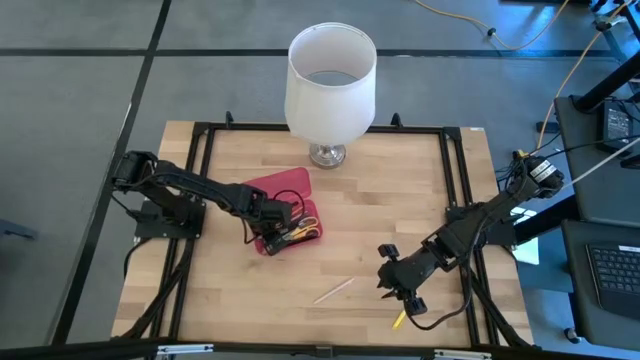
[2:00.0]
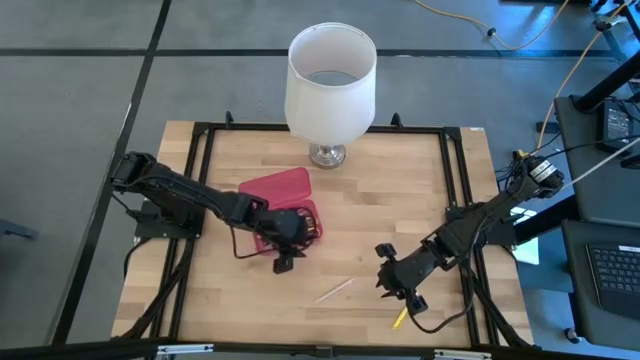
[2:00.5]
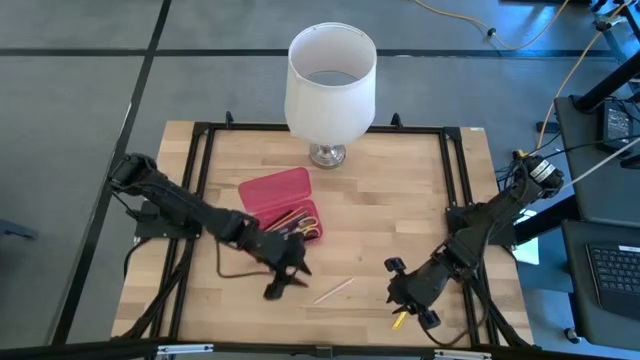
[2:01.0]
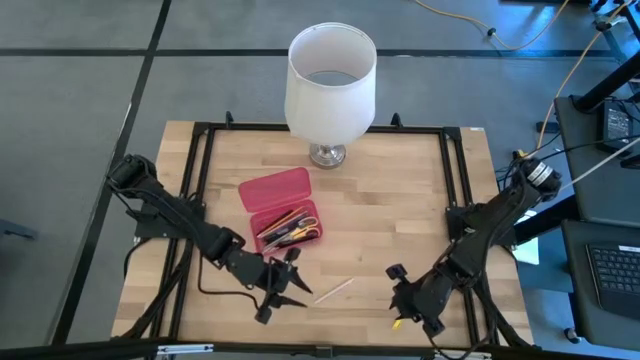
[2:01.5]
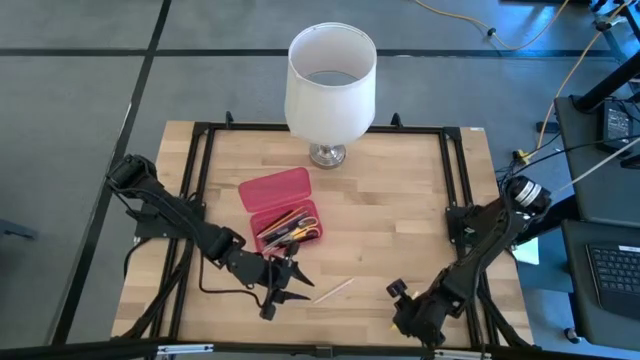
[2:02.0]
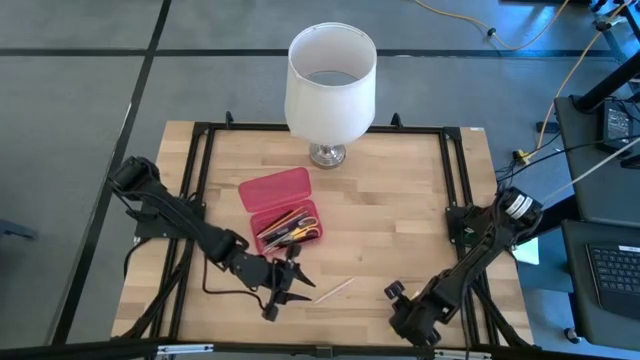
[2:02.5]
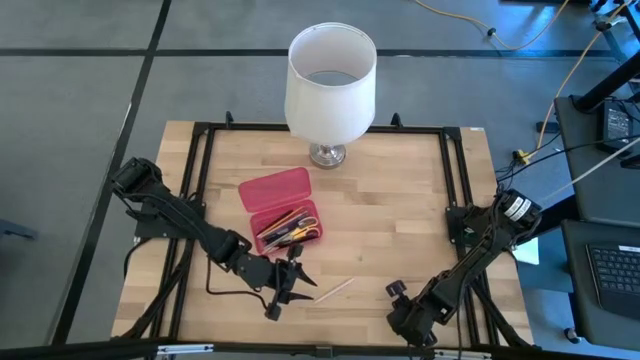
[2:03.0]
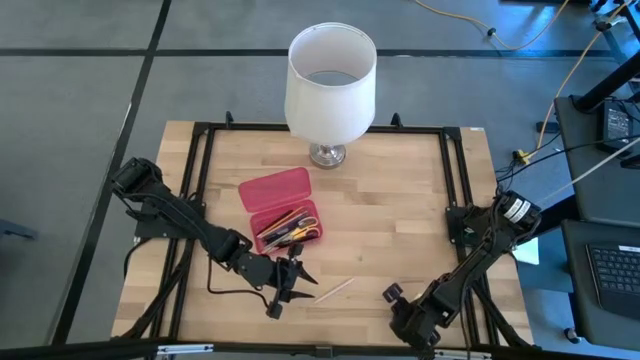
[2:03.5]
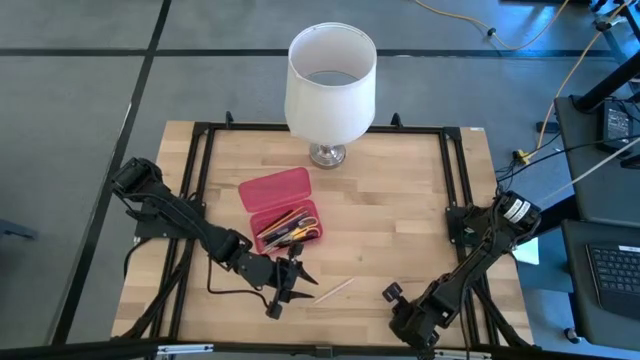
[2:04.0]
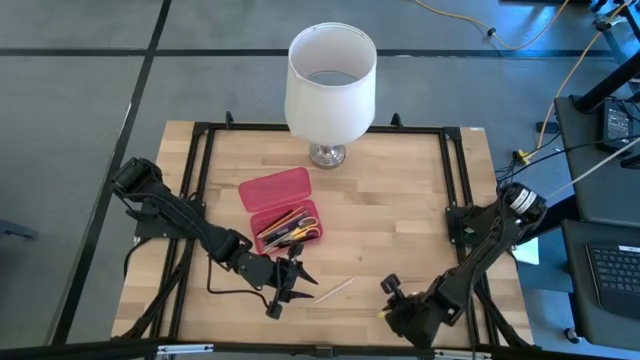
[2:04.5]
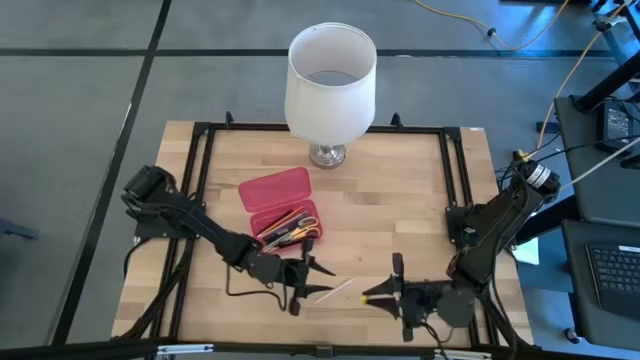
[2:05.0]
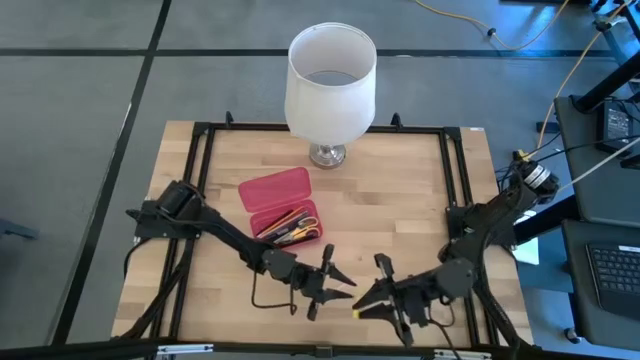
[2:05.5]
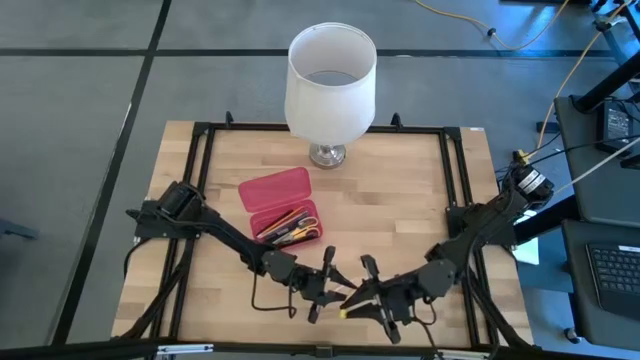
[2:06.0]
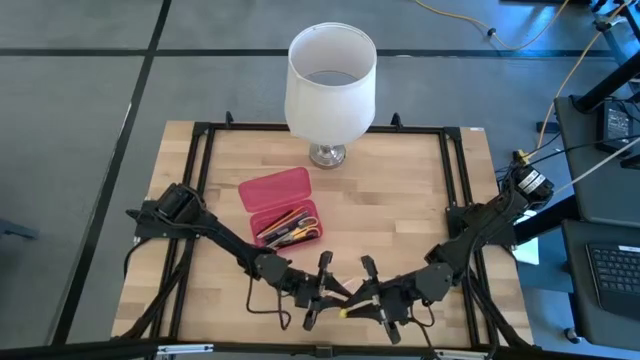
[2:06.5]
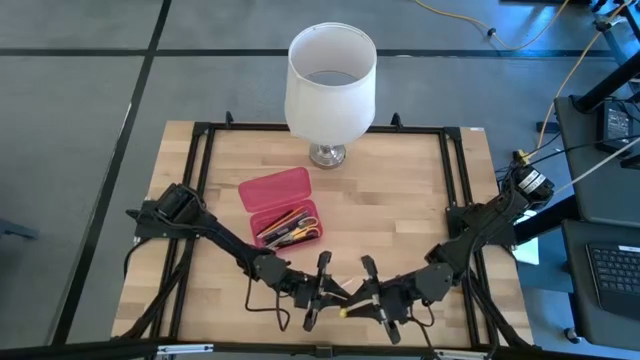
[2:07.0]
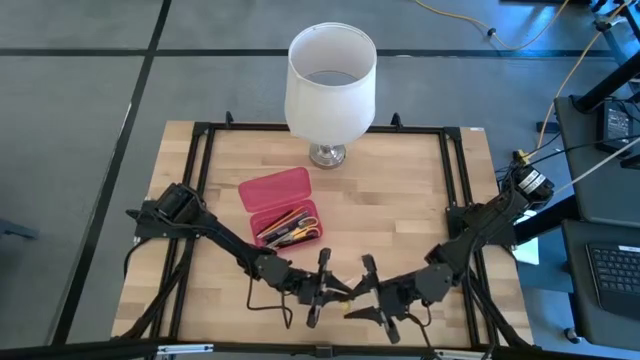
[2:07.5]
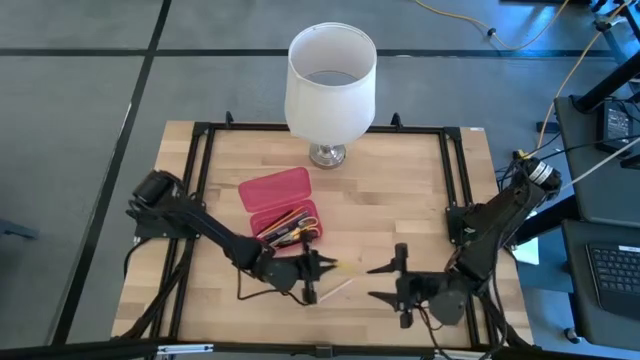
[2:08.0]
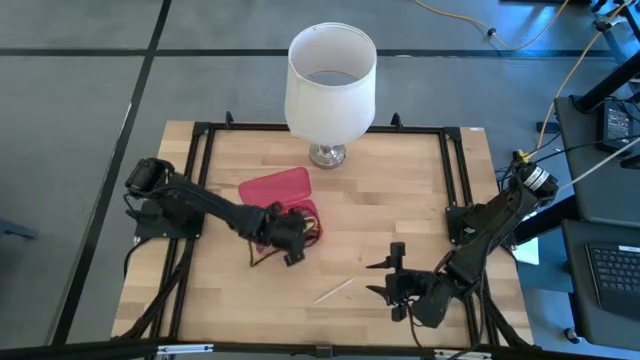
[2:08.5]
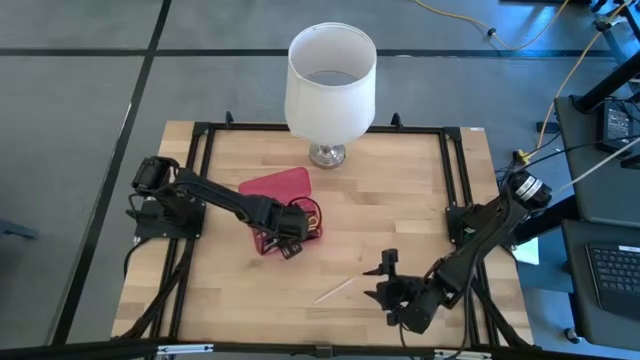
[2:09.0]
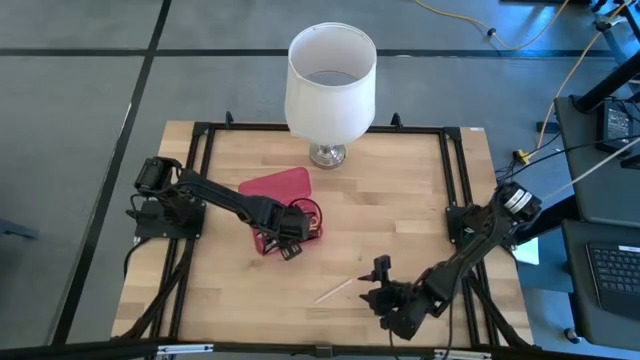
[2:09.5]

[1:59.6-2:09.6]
Task: Pick & place school supplies into a supply box
Put the yellow pen into the red supply box

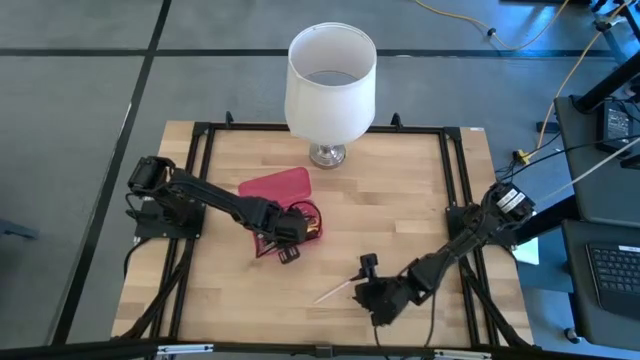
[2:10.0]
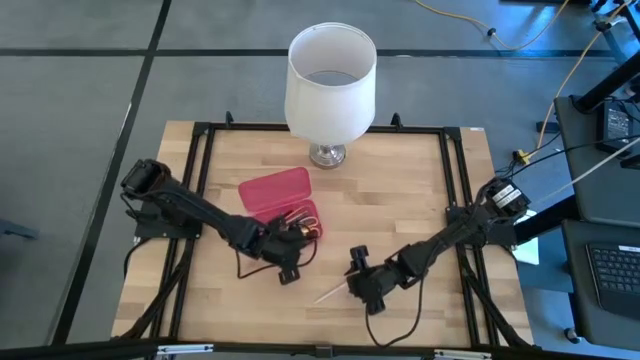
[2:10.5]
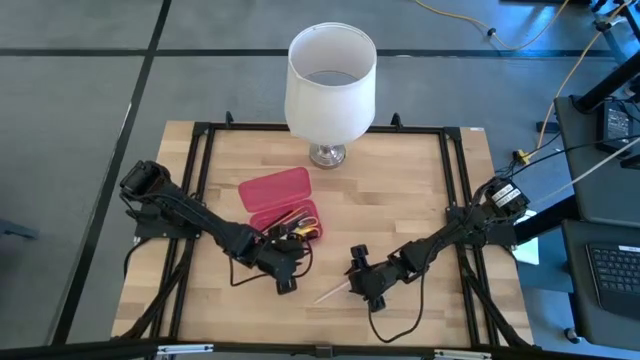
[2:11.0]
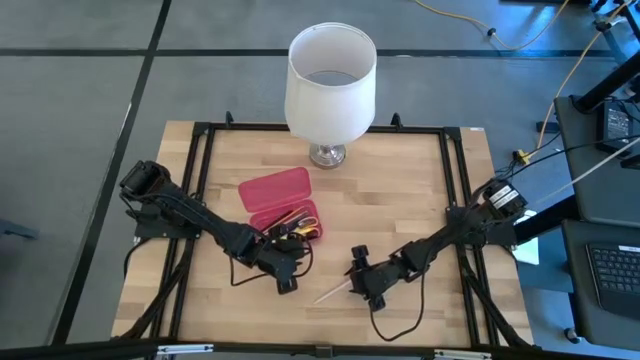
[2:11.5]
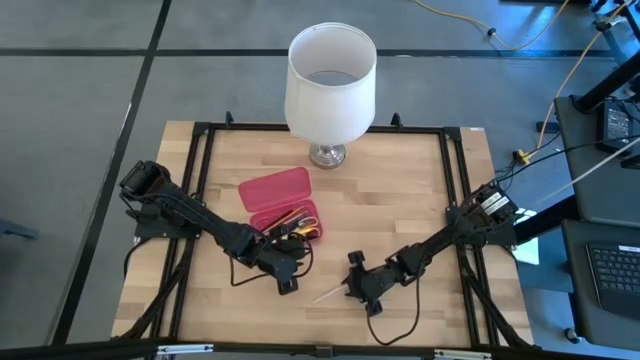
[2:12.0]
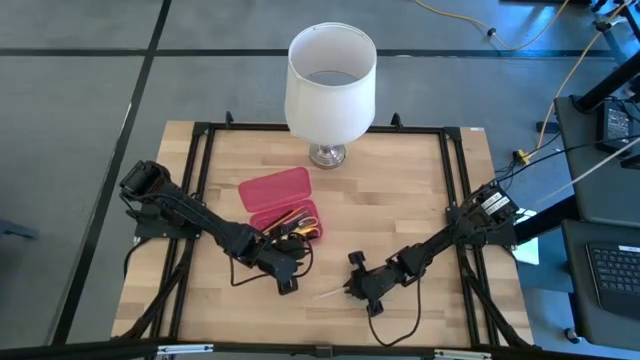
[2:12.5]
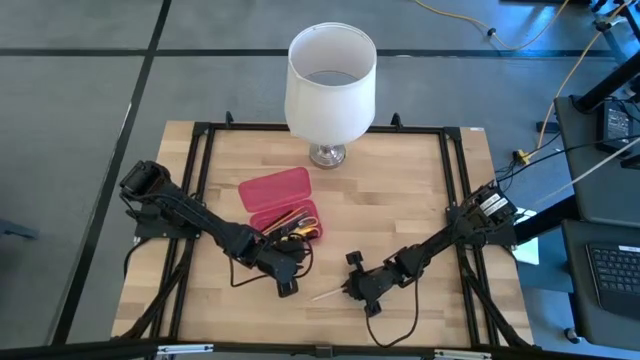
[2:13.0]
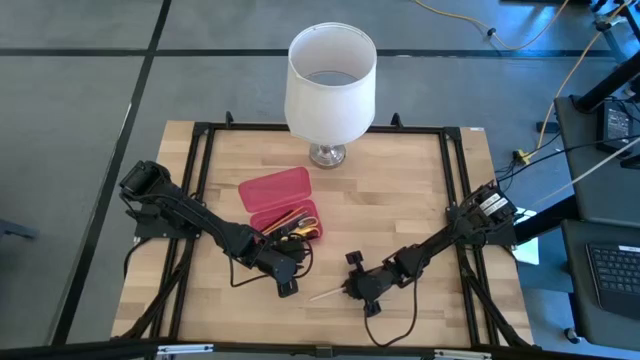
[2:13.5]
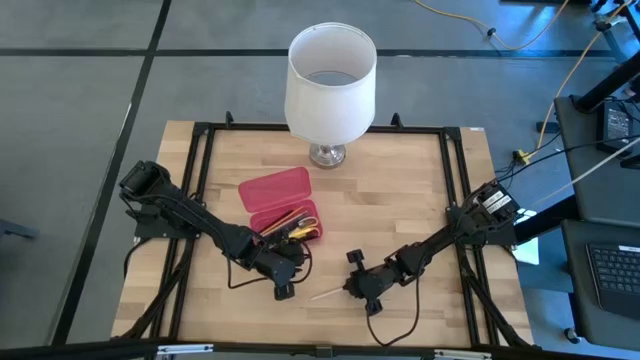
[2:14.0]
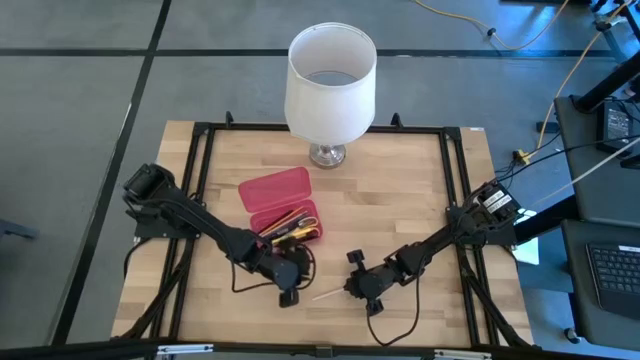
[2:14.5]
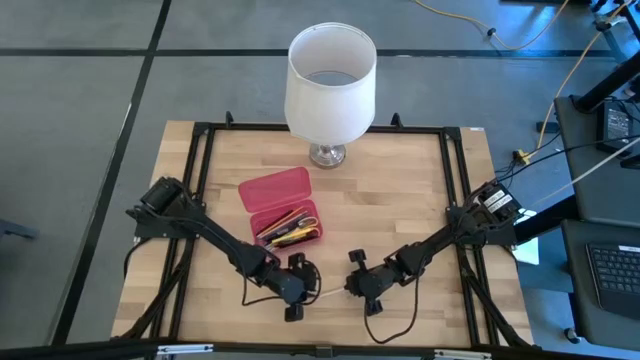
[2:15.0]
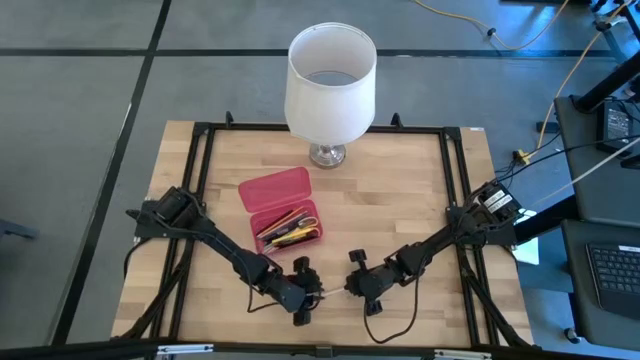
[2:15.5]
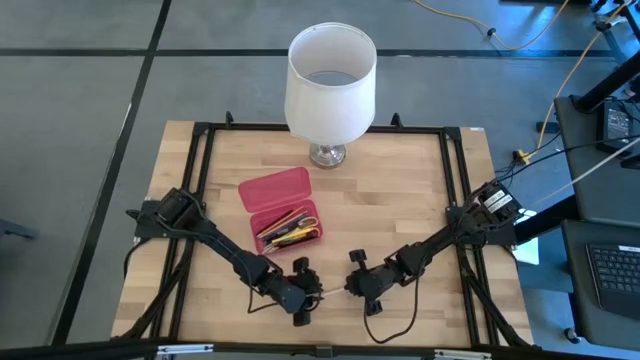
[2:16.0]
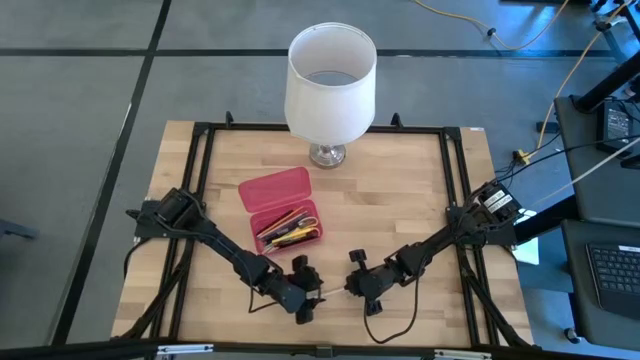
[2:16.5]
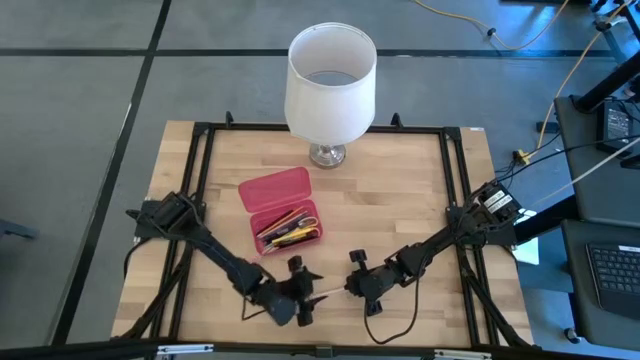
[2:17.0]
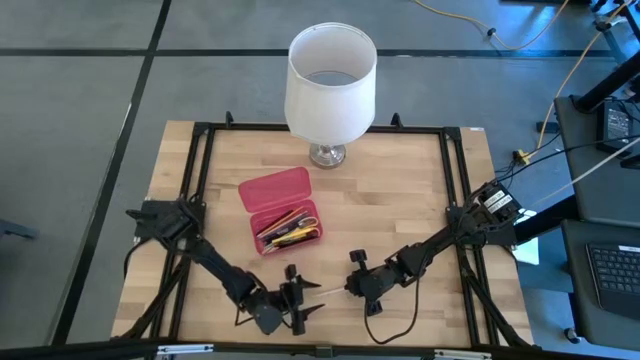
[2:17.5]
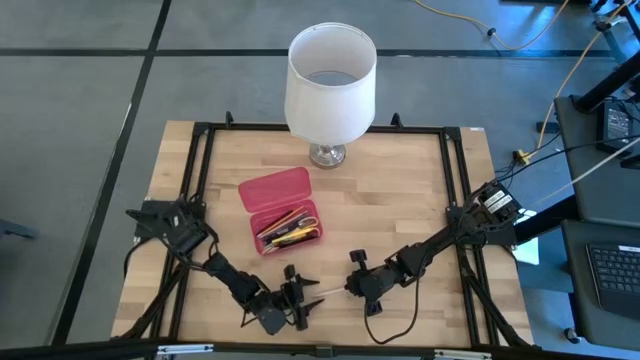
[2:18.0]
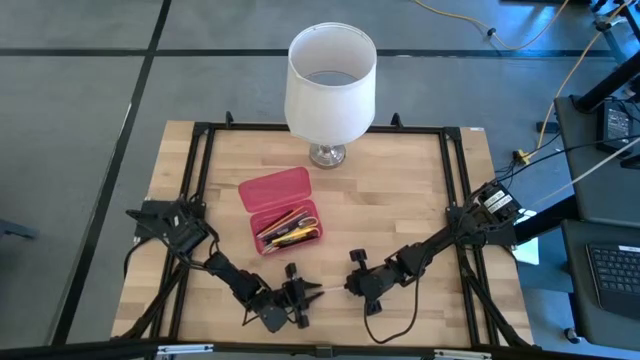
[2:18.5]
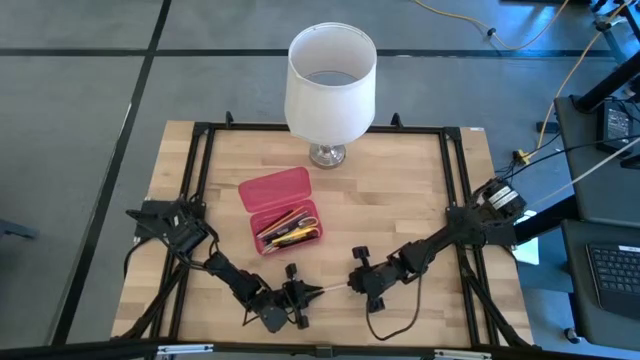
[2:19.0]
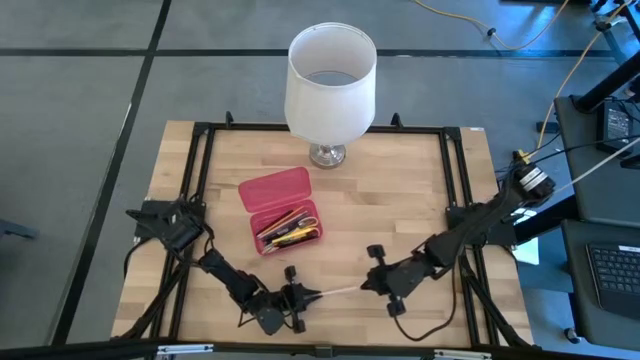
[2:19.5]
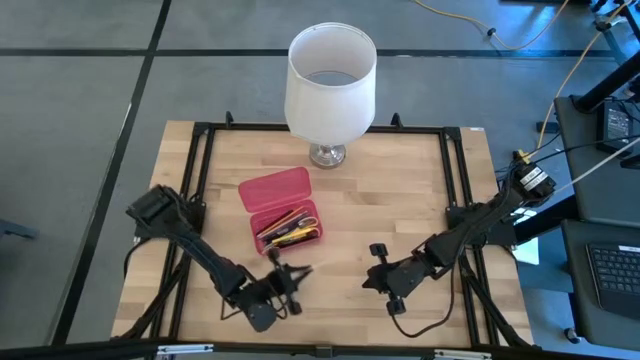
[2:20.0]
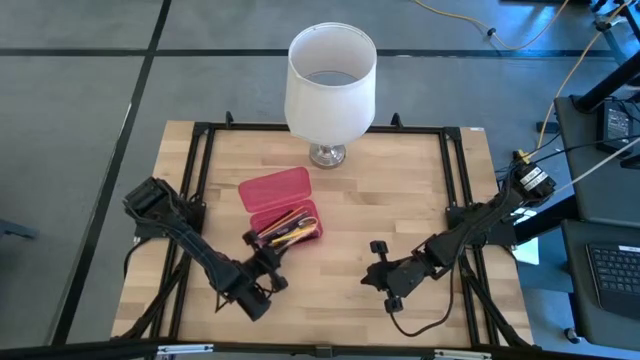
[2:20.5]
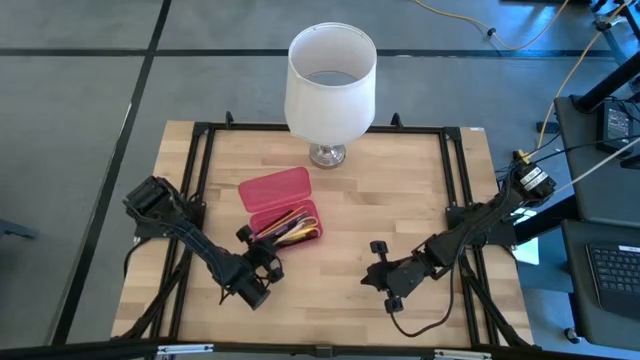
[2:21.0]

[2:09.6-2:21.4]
Put the light pink pen into the red supply box
